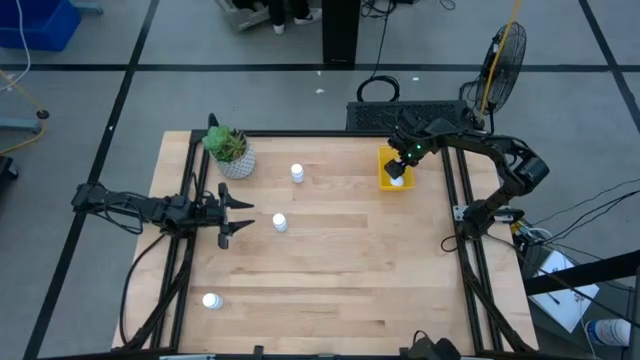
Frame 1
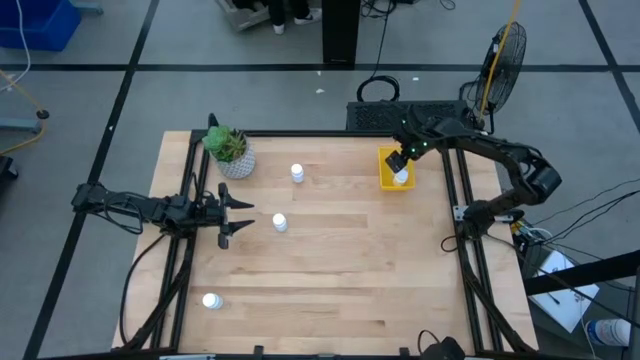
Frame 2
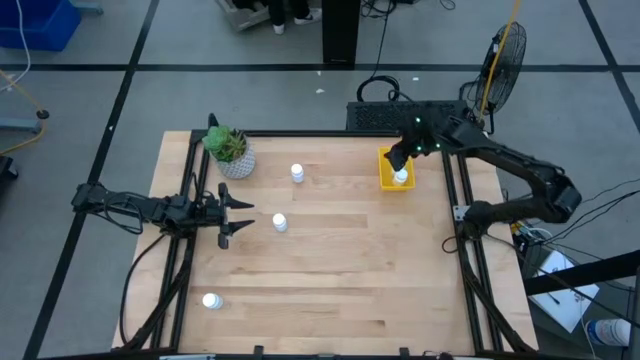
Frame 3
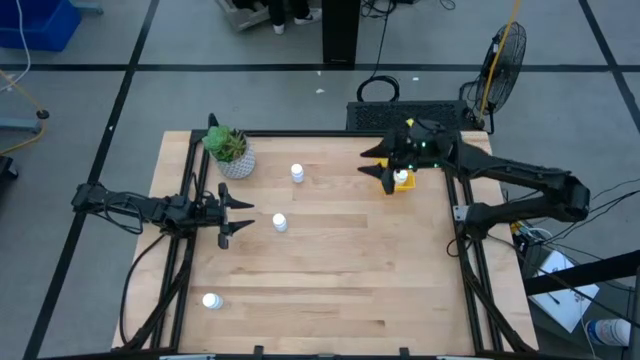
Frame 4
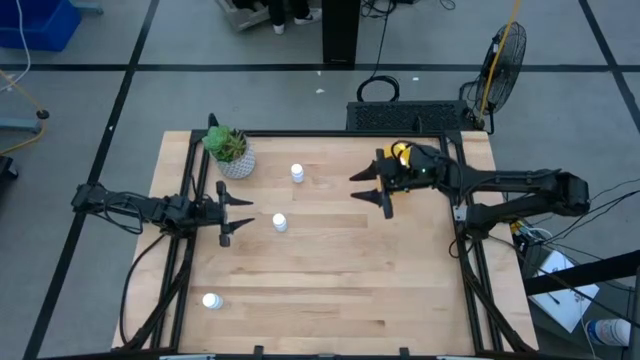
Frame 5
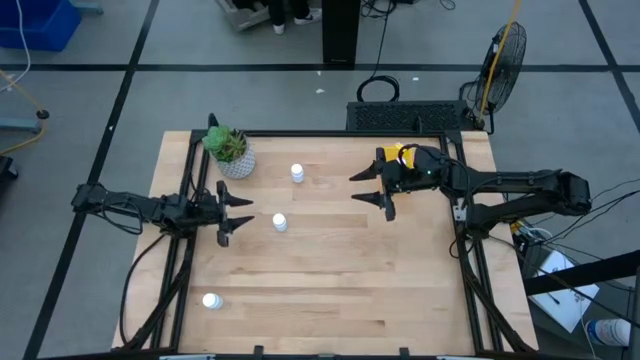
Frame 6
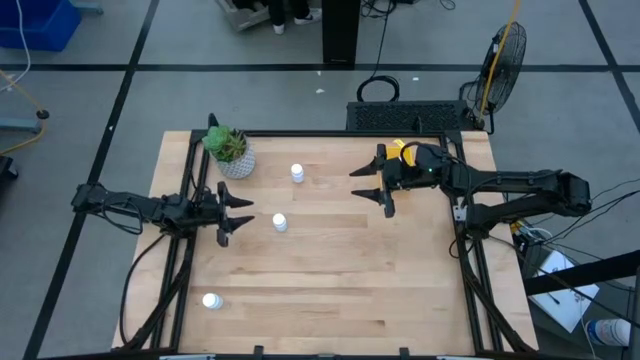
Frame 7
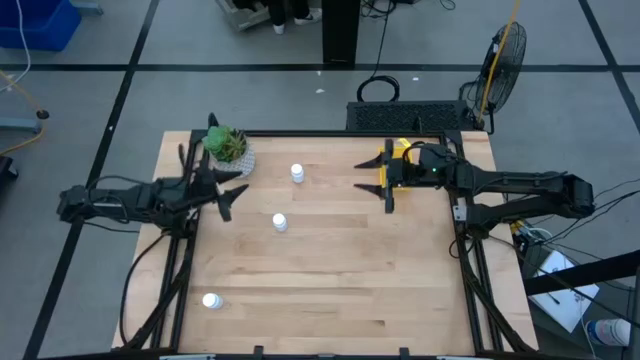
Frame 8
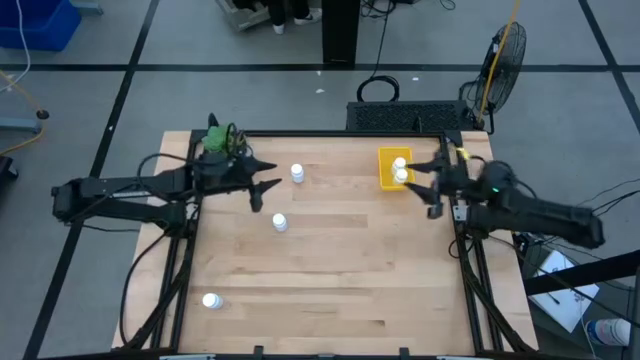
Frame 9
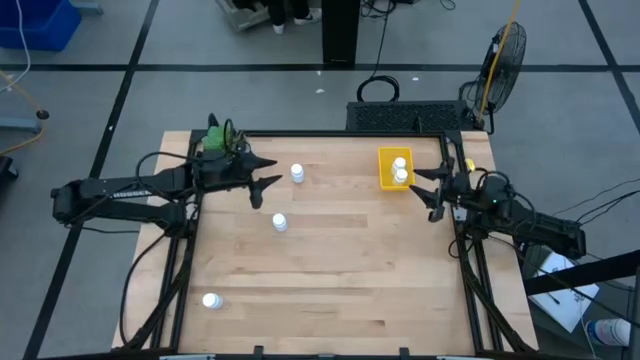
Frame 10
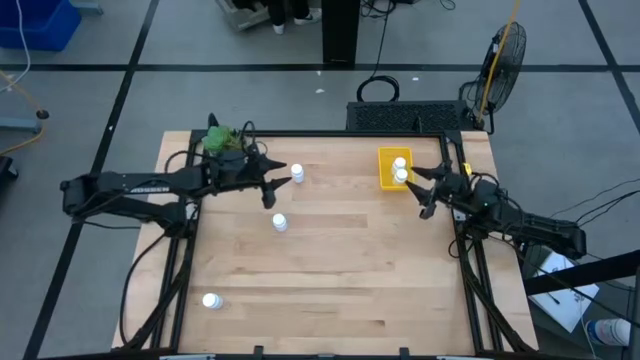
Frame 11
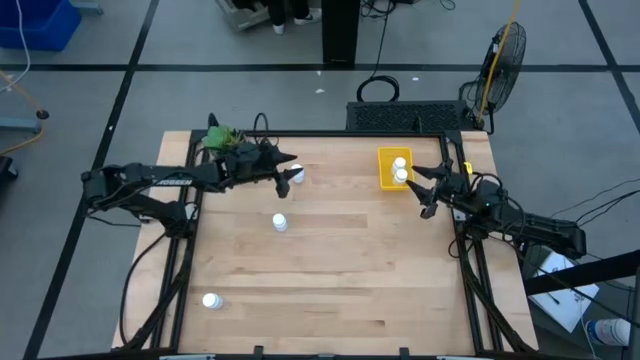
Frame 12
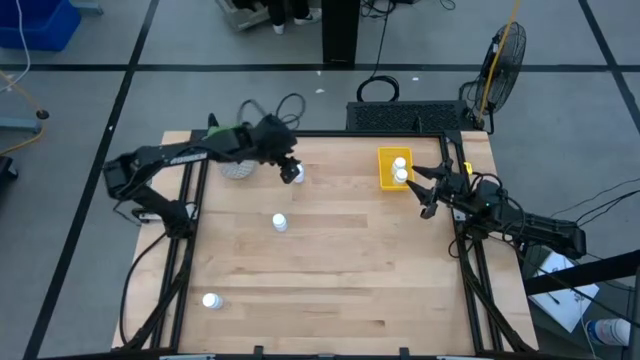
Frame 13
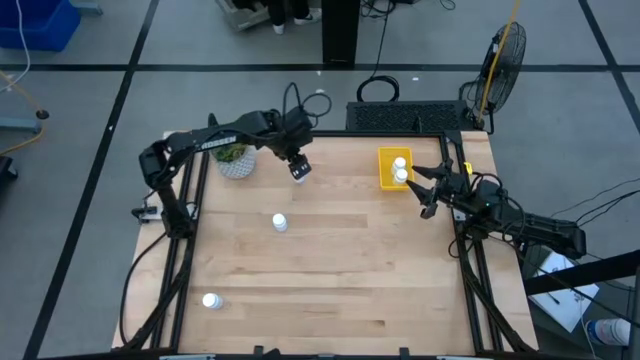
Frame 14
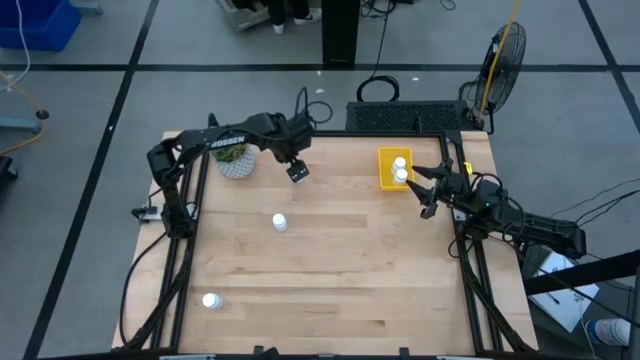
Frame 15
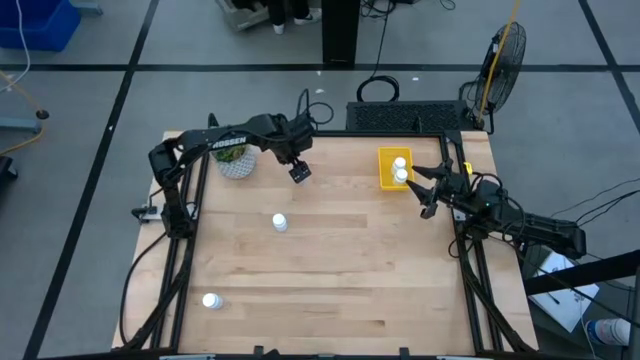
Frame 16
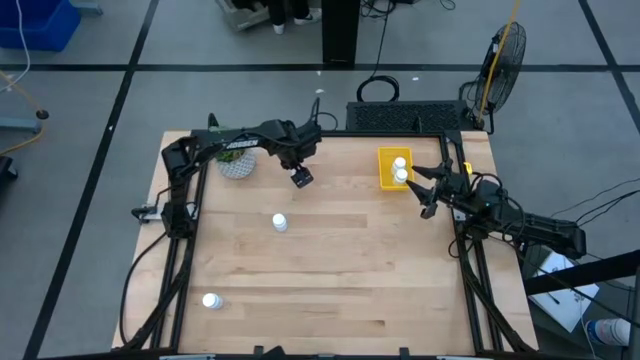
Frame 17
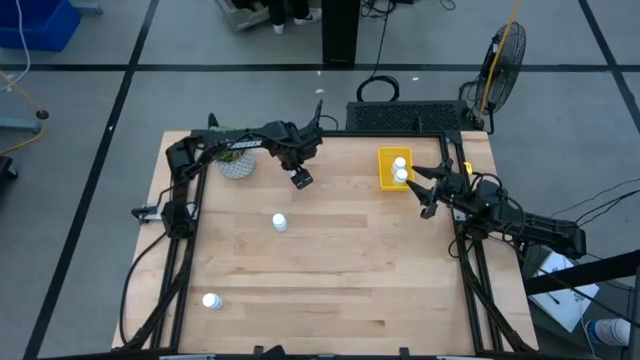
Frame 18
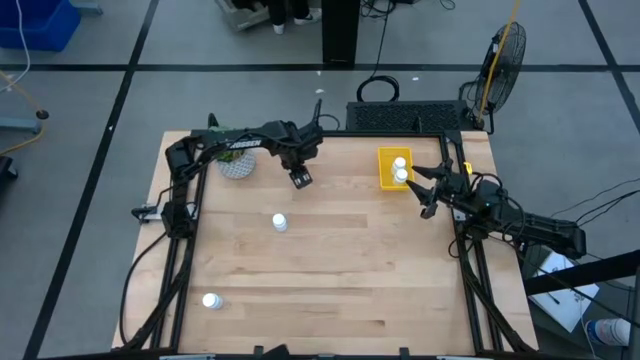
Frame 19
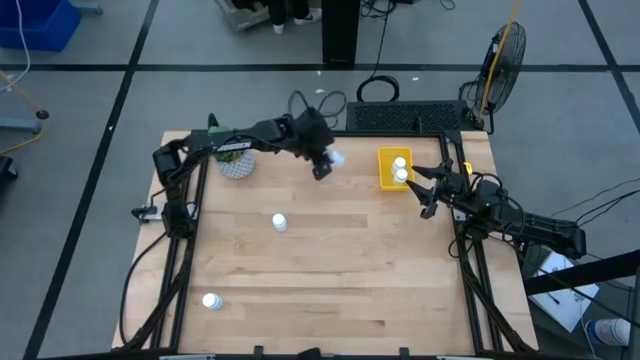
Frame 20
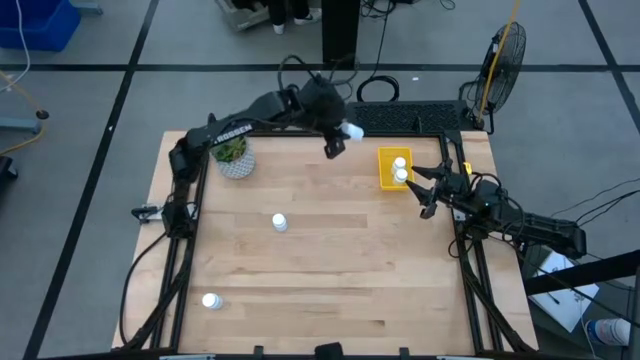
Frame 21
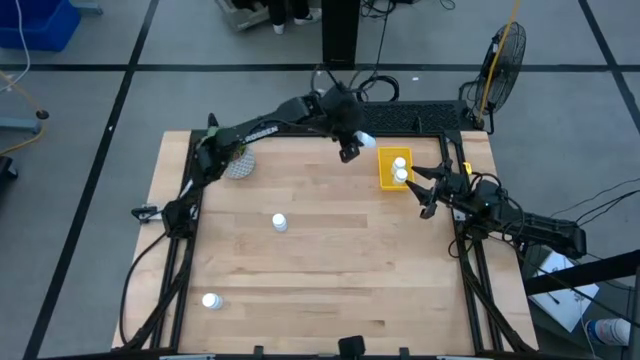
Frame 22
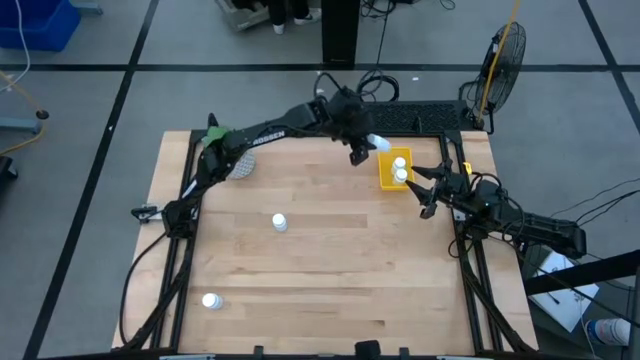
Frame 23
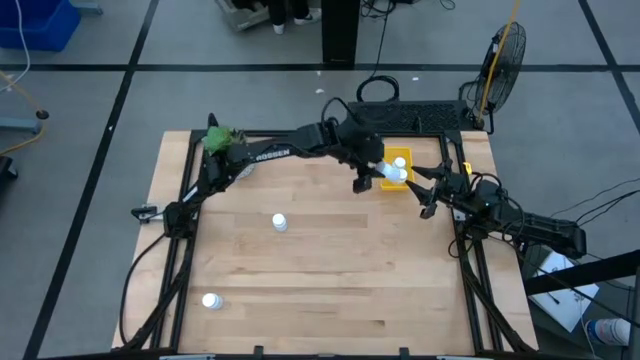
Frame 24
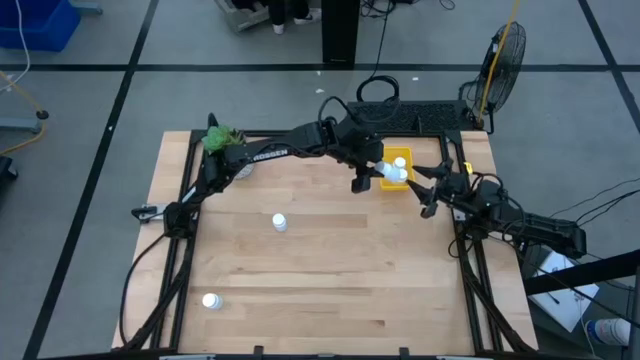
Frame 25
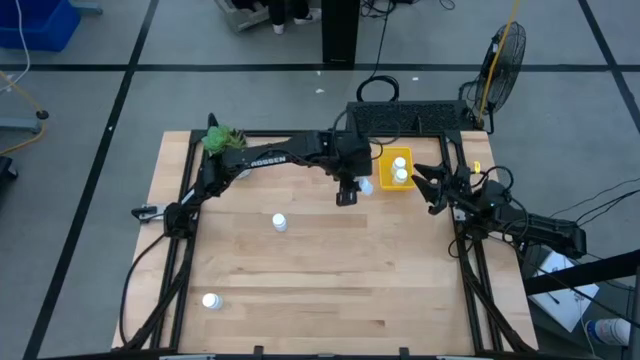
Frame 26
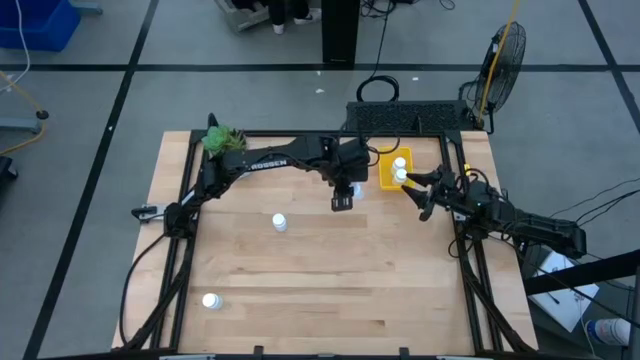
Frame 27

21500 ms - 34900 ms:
Task: Pick and place pill bottles into a basket
Put the top white medicine bottle into the yellow bin

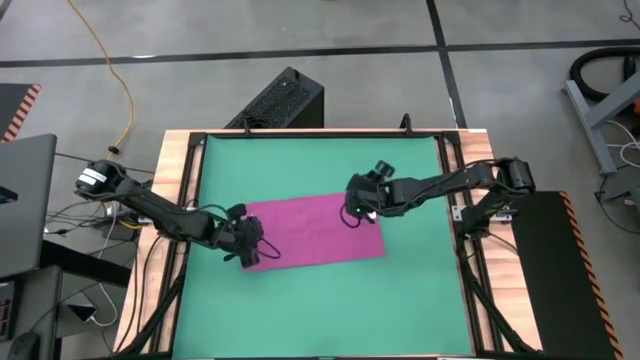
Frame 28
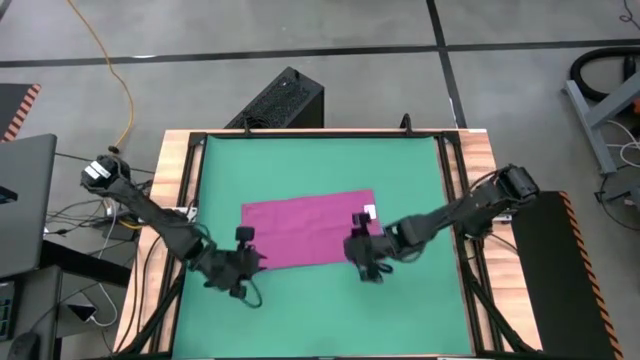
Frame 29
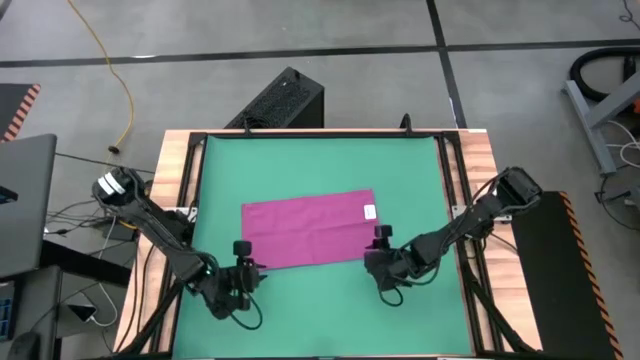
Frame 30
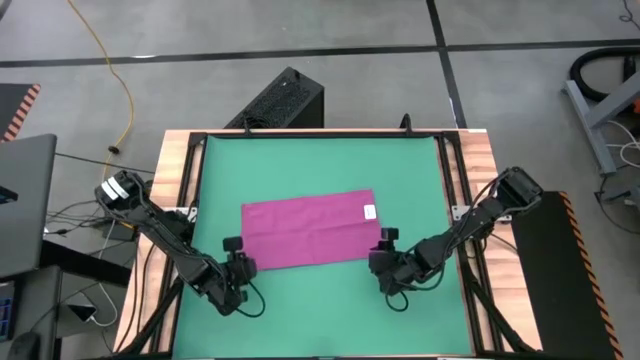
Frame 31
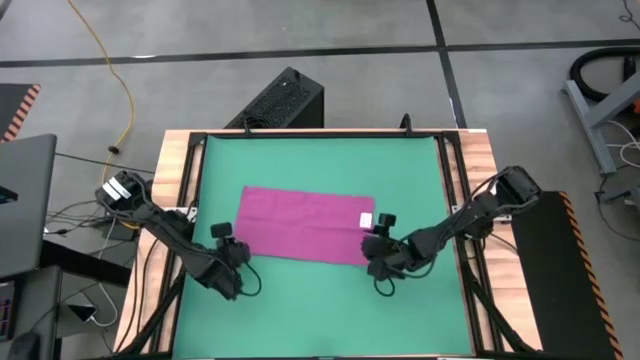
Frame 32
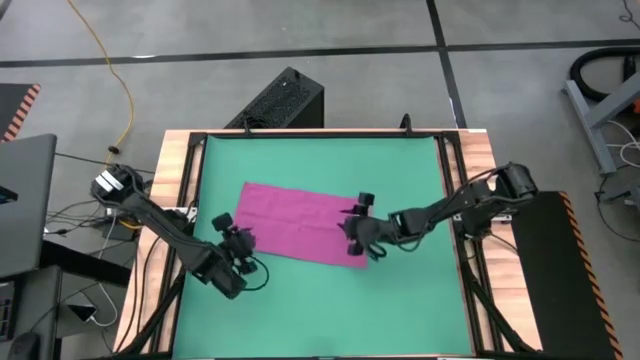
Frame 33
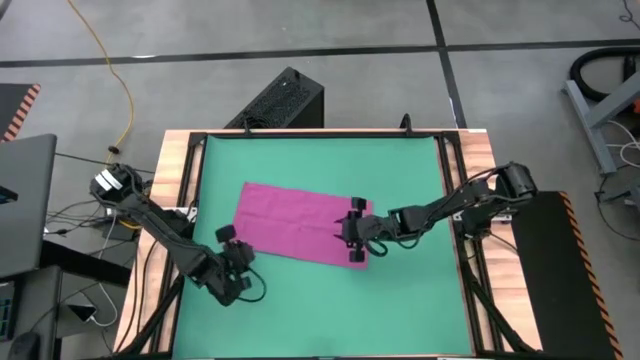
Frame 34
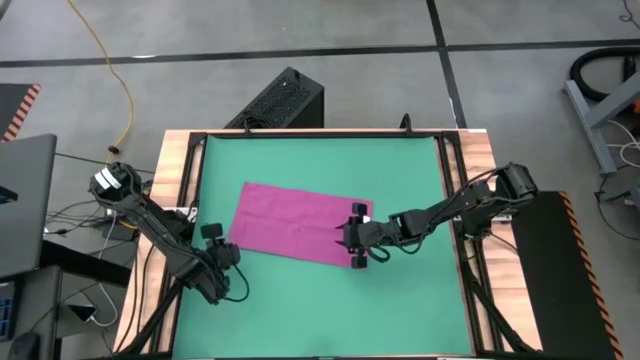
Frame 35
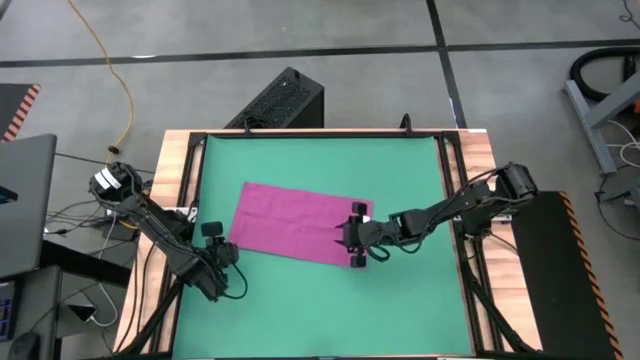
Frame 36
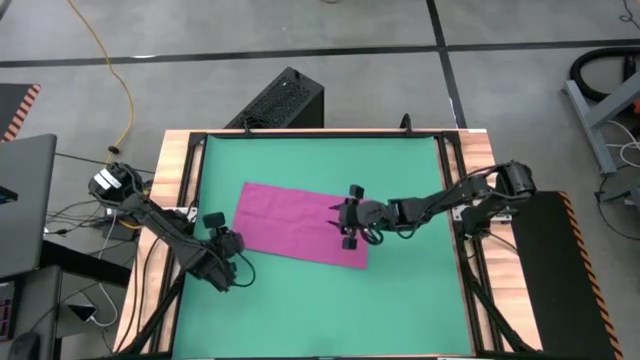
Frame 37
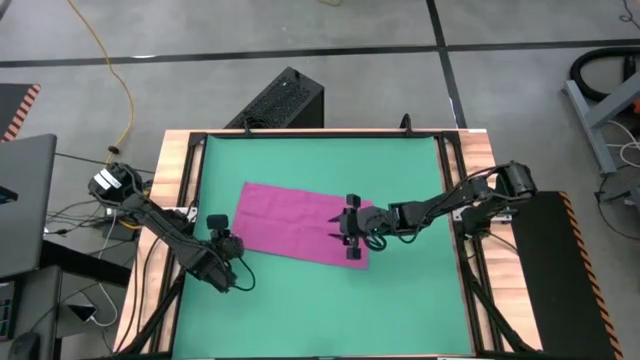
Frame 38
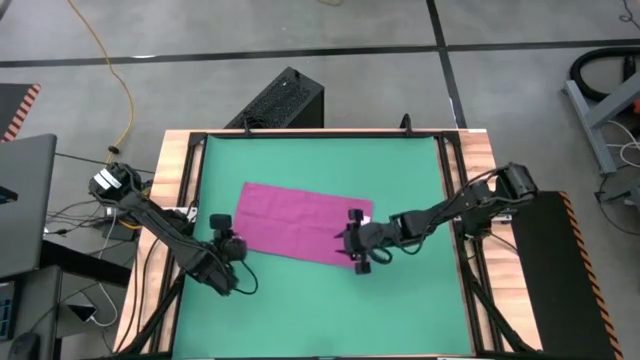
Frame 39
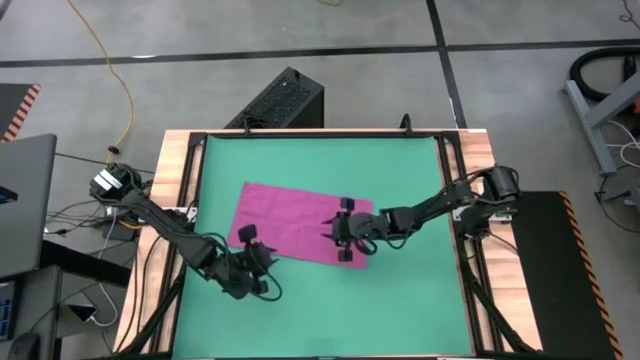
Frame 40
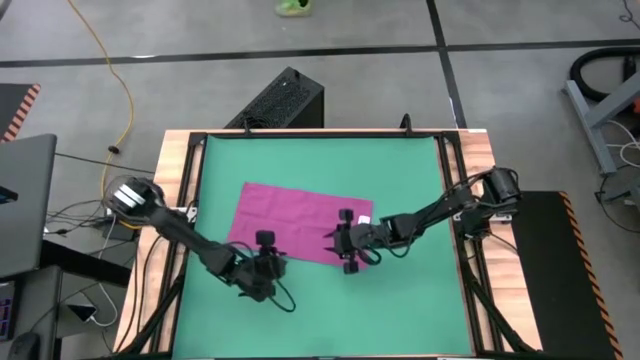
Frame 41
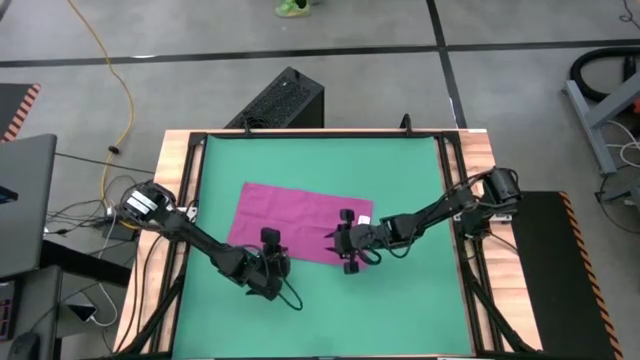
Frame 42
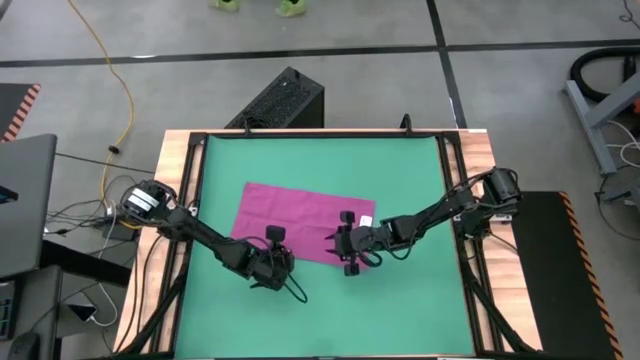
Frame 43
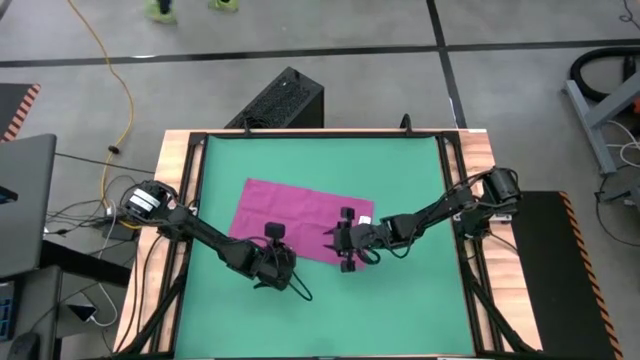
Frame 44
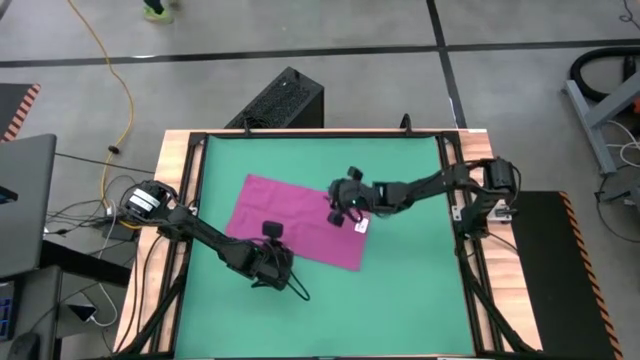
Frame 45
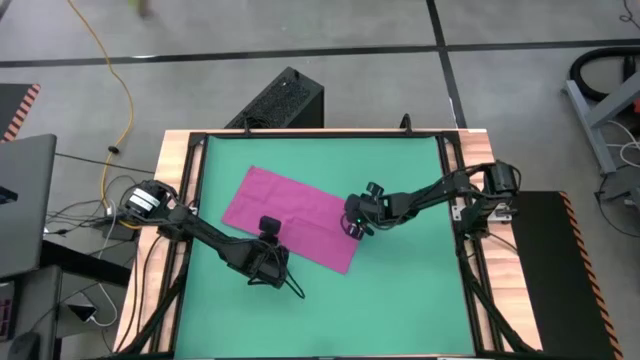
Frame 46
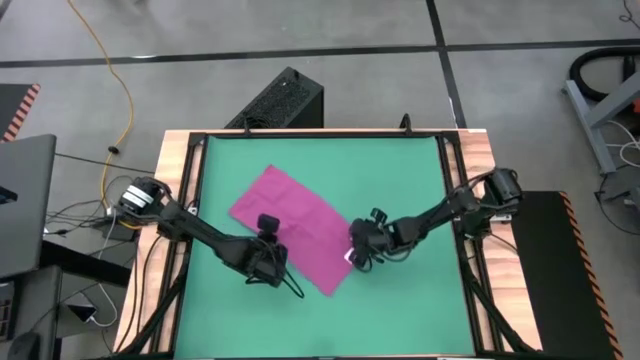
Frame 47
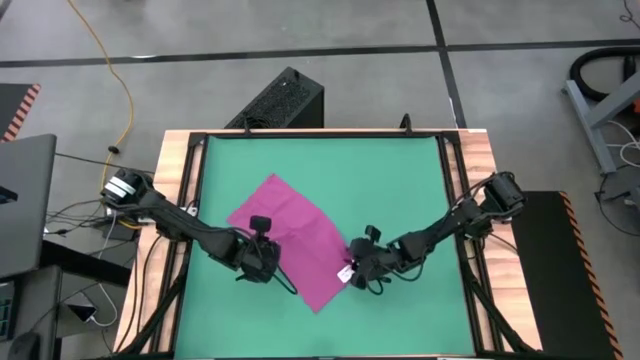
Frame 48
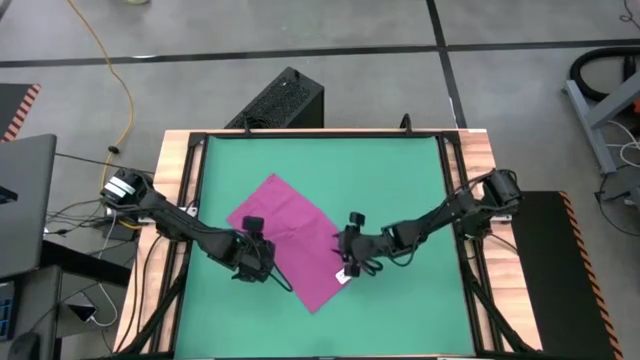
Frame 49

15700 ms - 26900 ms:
Task: Roll towel
Fold the violet towel
